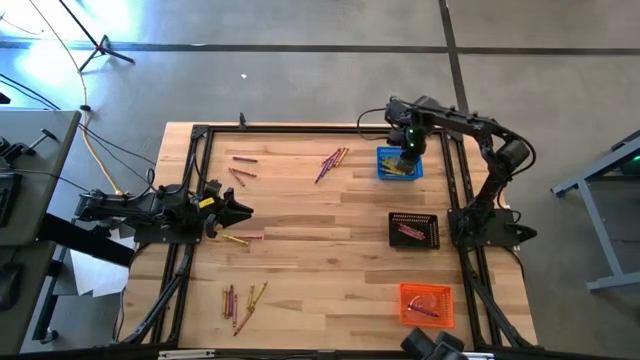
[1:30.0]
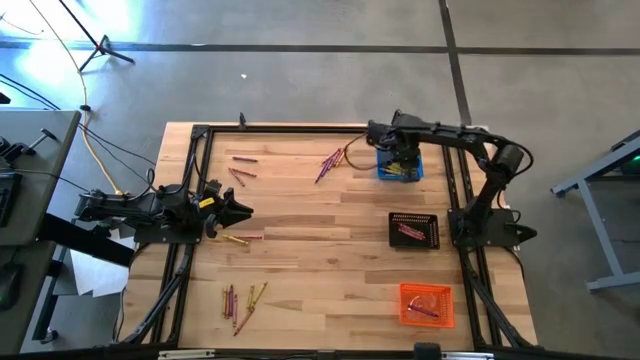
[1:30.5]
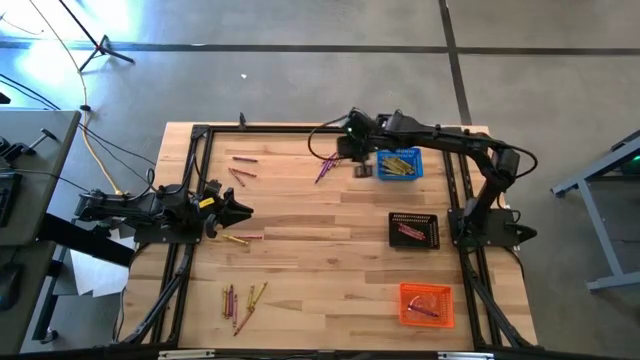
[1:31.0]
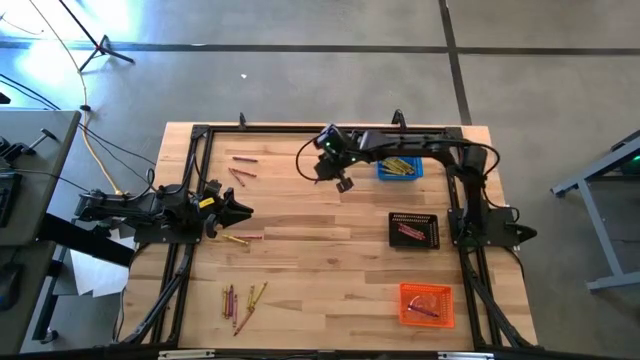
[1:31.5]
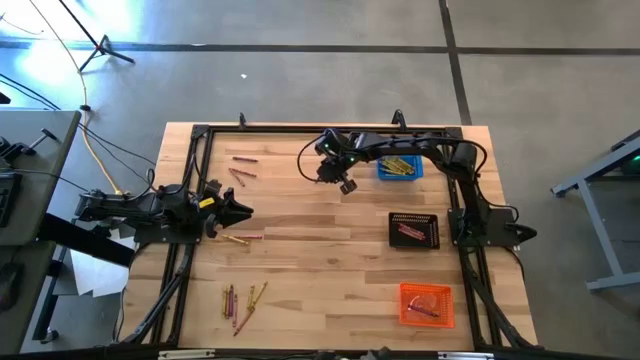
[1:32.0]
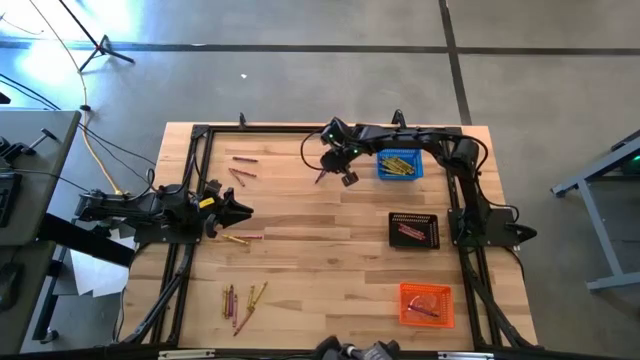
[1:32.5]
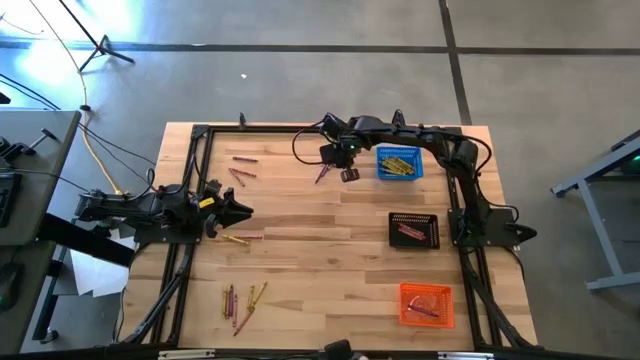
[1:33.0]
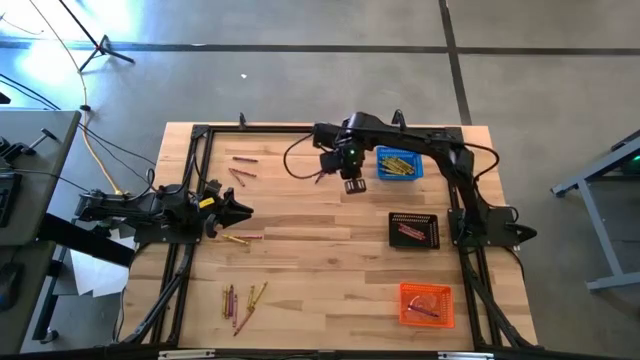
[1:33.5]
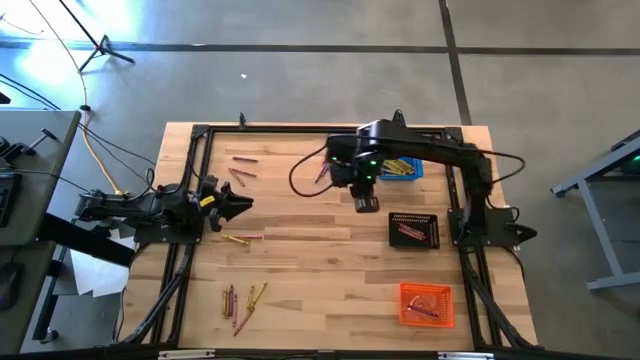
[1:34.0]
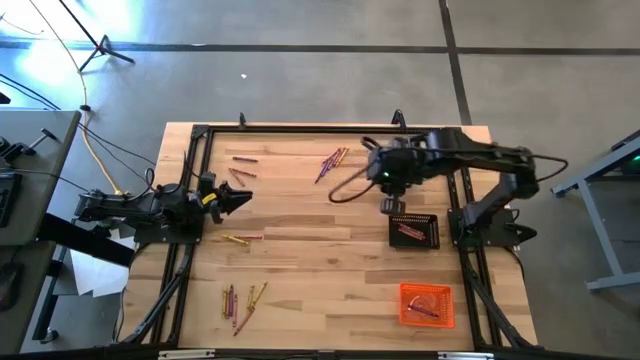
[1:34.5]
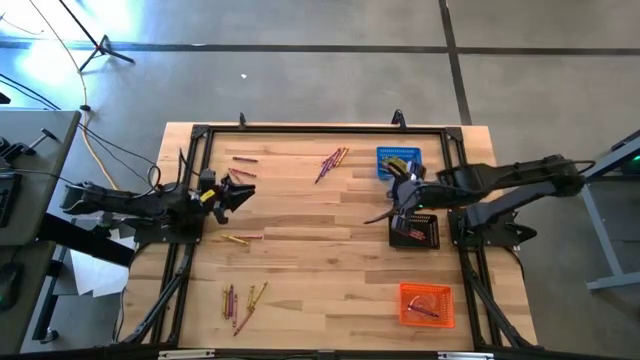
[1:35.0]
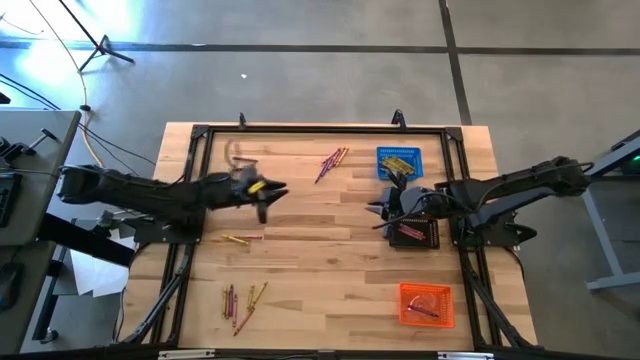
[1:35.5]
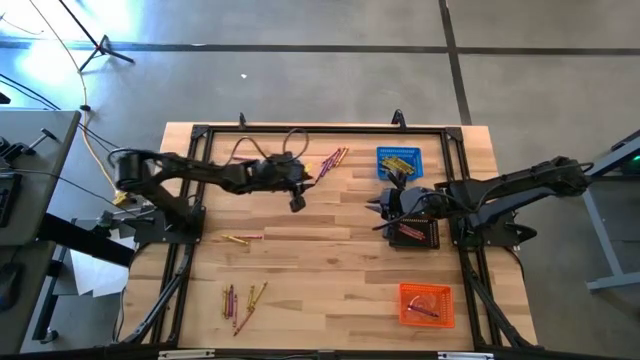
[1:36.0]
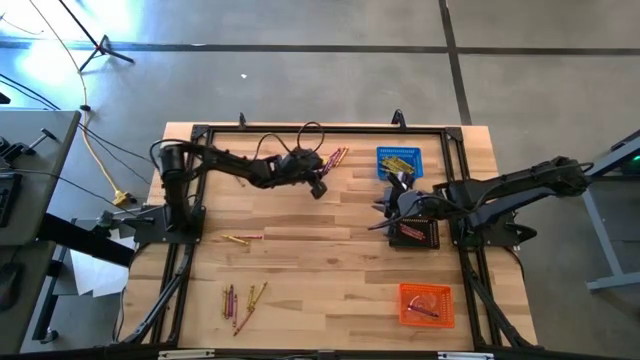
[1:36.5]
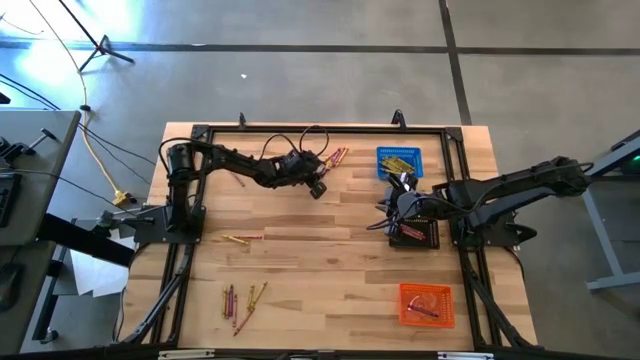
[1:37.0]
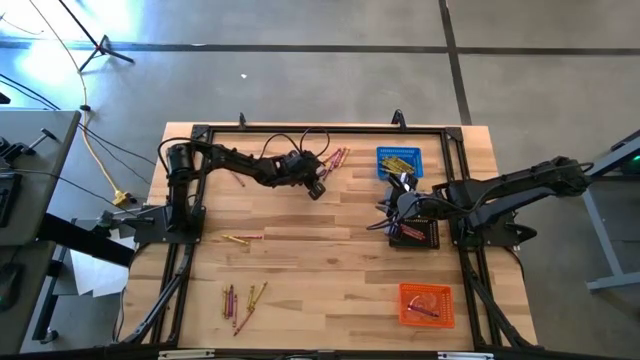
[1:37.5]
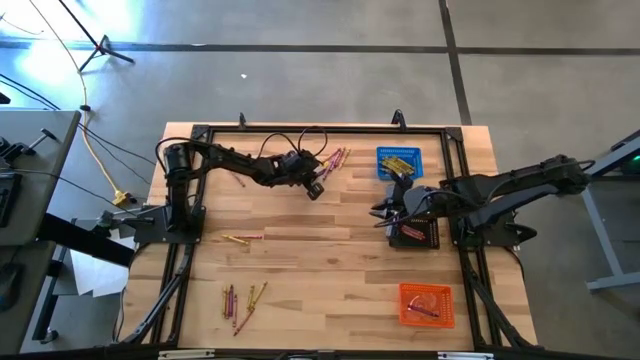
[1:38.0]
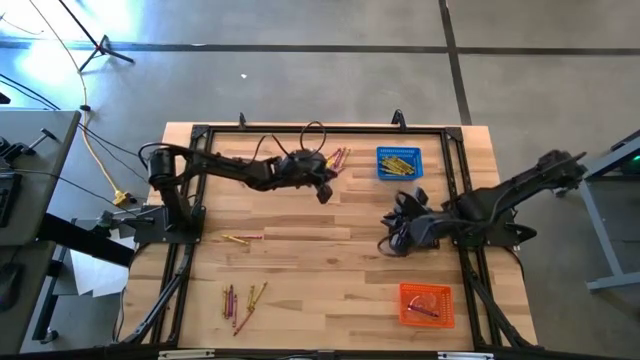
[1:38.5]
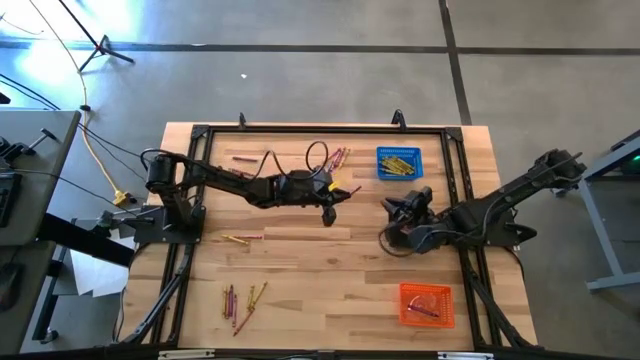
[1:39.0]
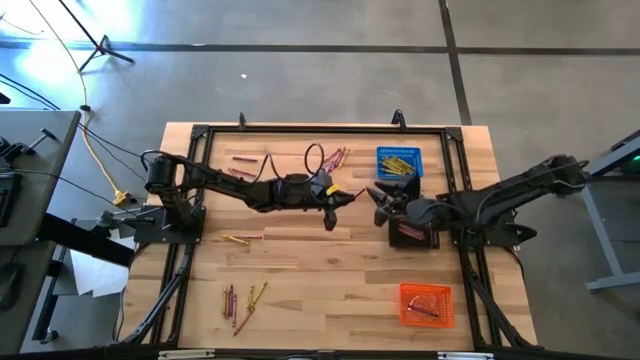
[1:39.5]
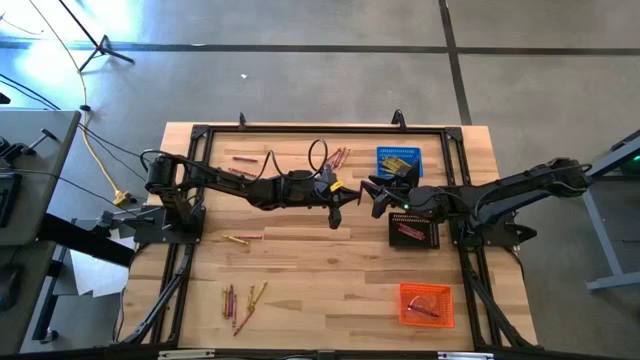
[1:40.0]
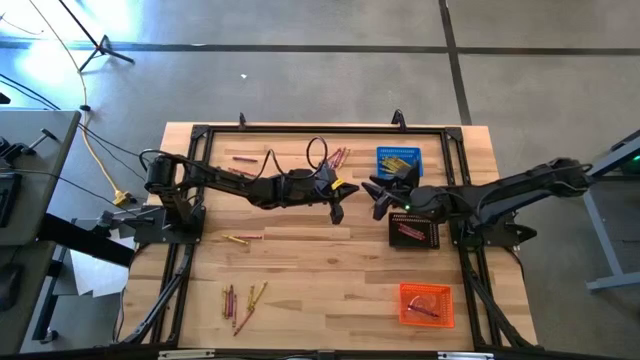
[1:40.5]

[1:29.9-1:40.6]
Task: Sort crayons
Put the violet crayon into the orange bin

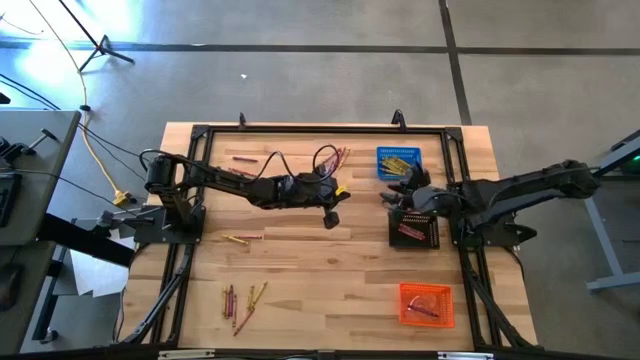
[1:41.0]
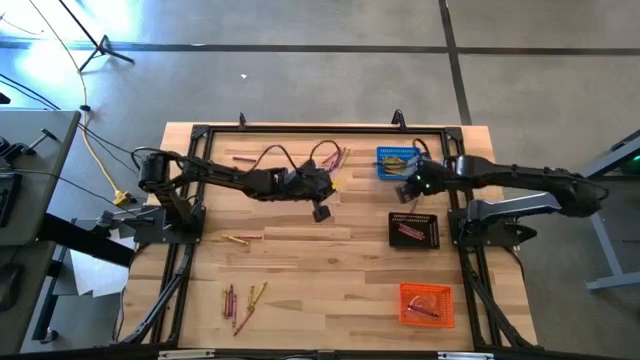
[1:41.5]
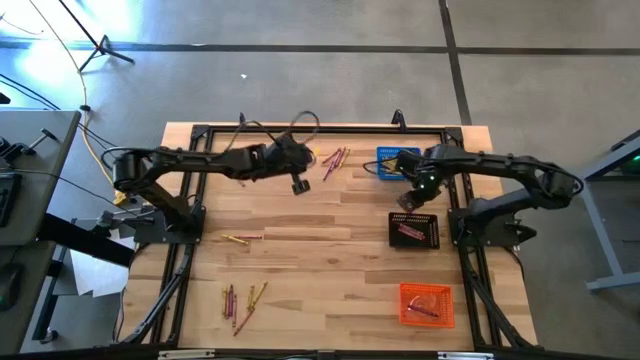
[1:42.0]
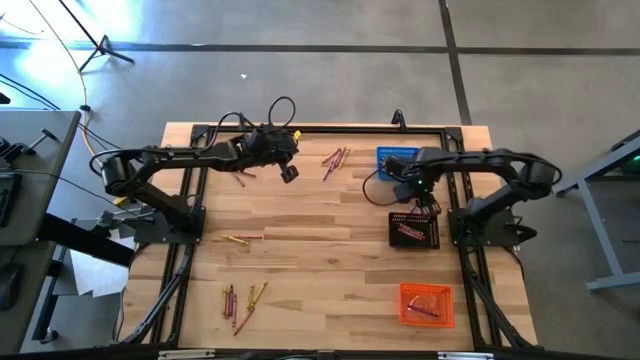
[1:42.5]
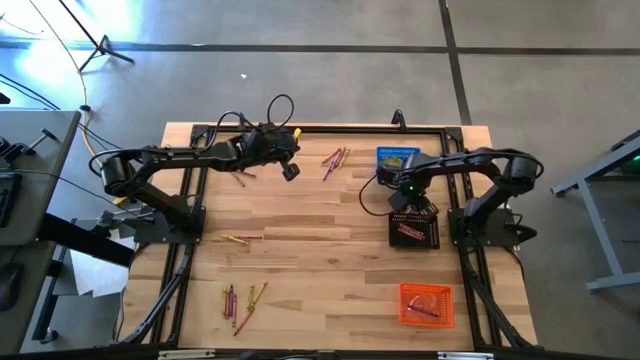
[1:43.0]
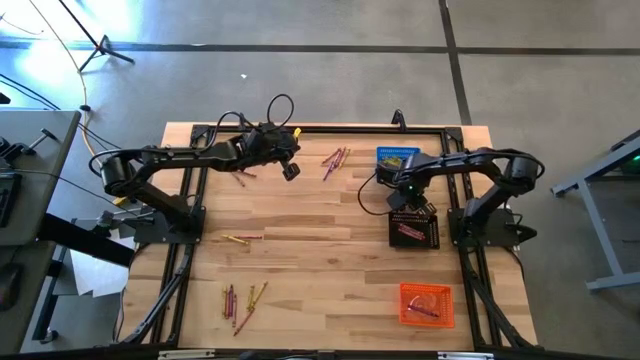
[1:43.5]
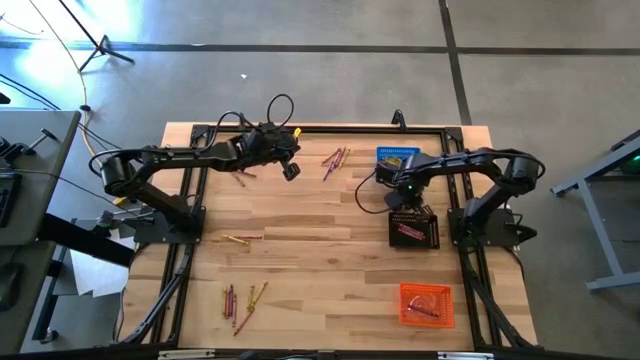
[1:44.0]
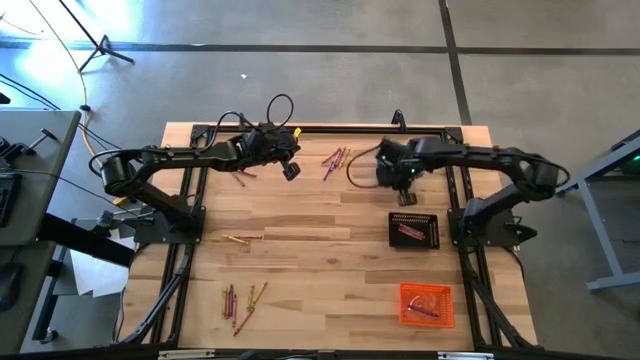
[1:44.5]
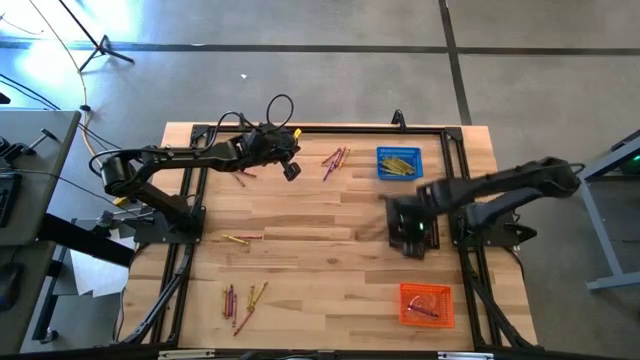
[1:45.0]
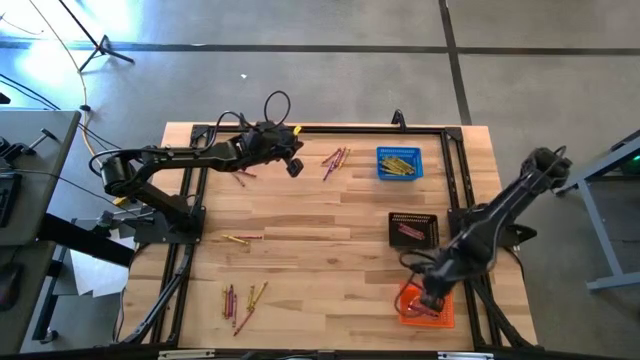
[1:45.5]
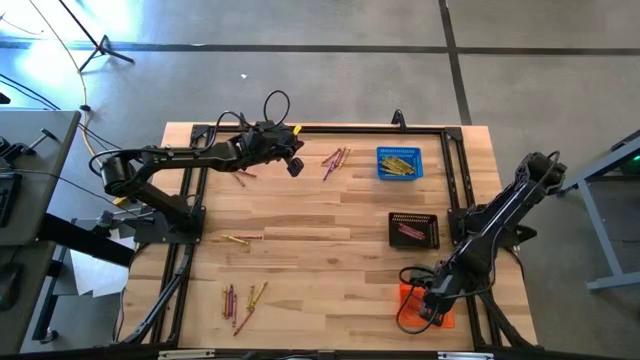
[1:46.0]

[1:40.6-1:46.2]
Put the violet crayon into the orange bin

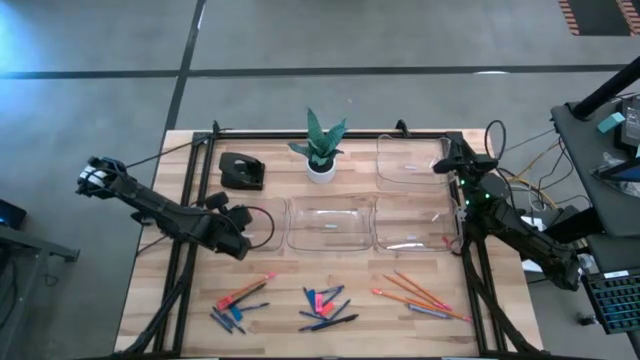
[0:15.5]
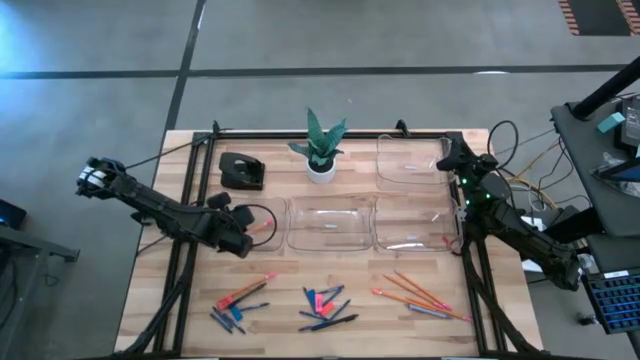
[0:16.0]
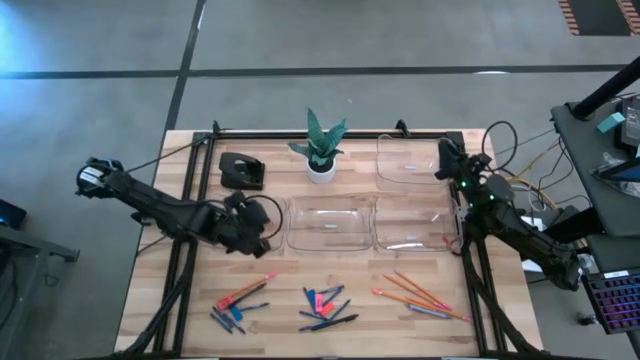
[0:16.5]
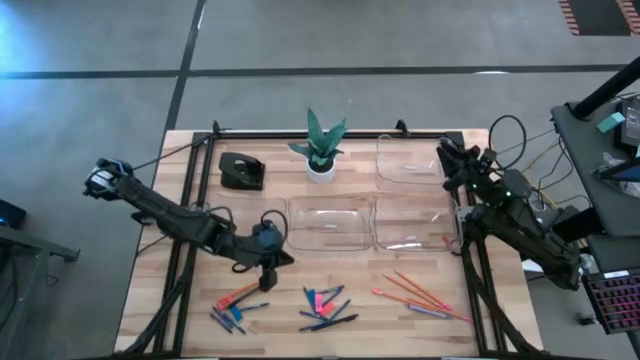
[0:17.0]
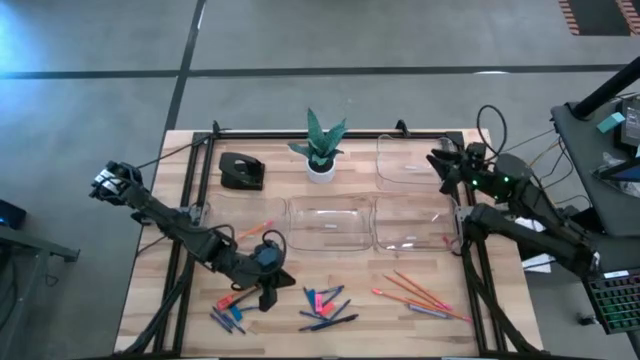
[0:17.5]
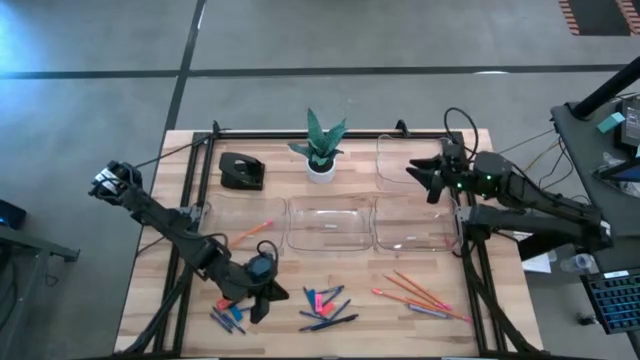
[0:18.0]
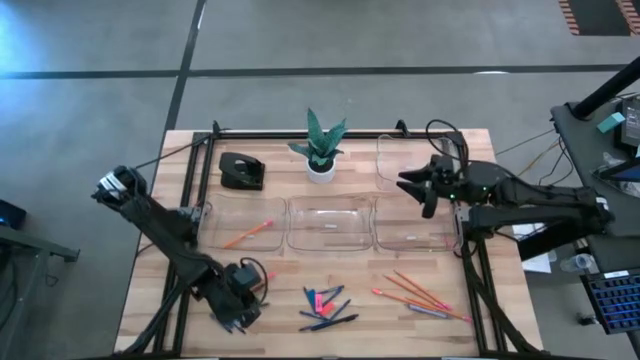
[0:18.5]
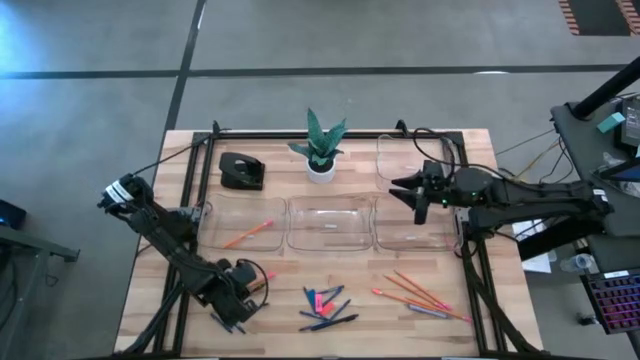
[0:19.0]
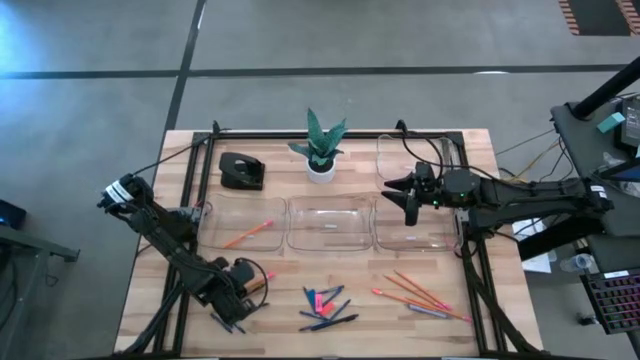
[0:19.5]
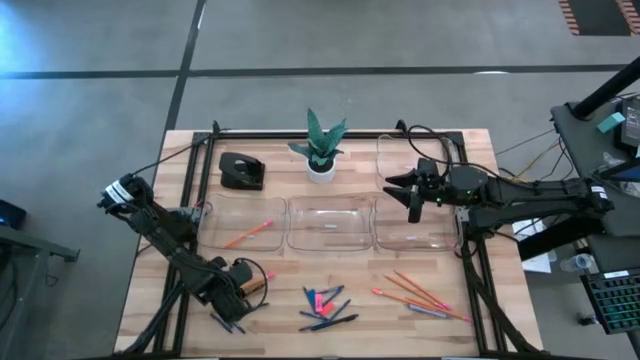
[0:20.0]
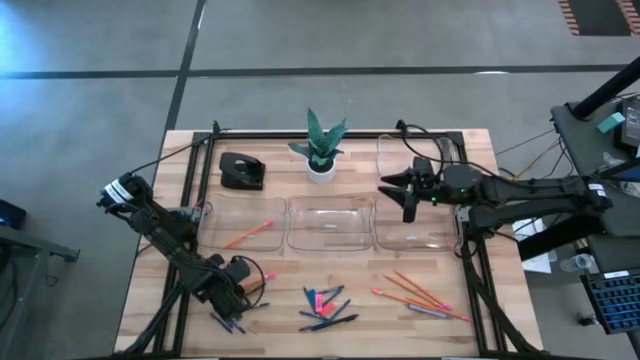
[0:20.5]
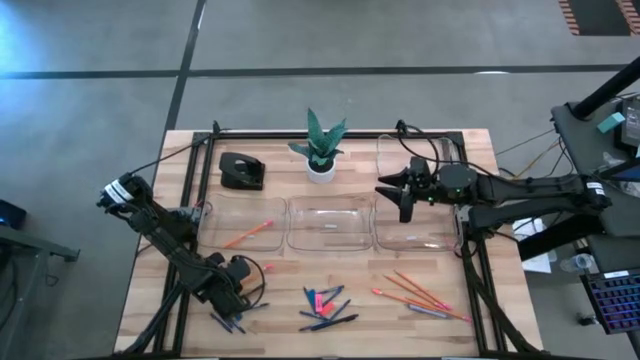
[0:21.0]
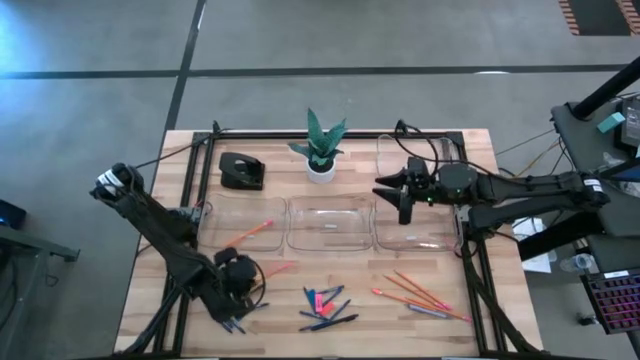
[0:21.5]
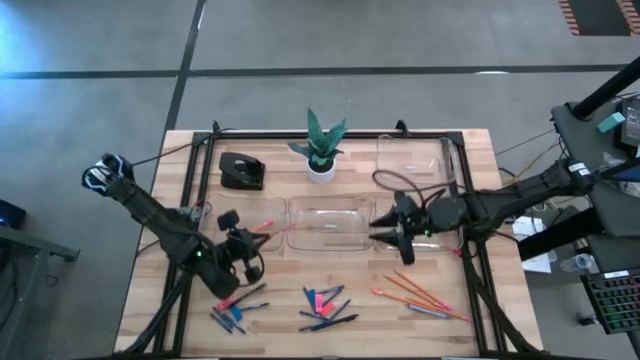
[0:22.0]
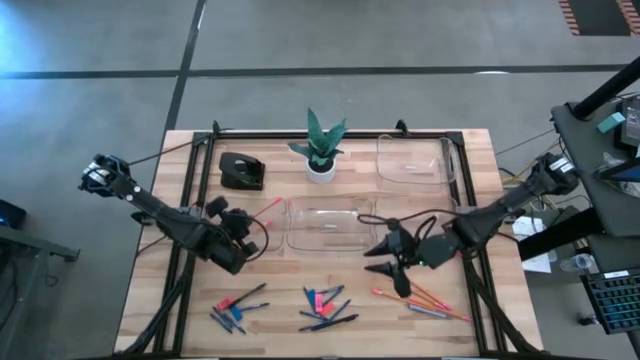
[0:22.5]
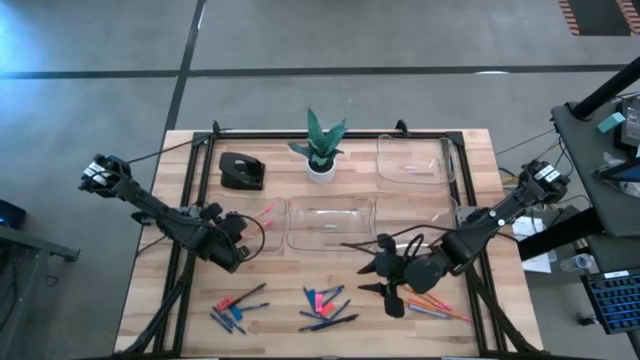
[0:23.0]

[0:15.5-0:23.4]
Task: Sort crayons/erasers/pens/pencils in bins
Put the orange pencil into the bottom left transparent bin
